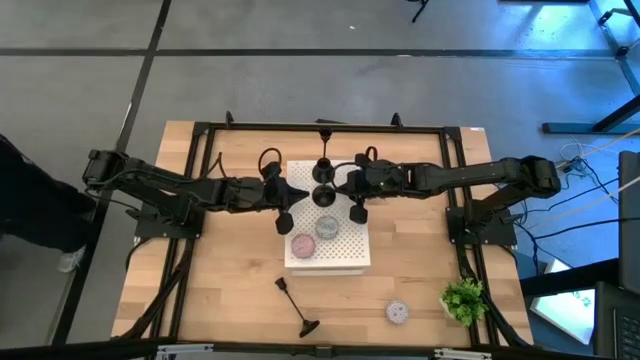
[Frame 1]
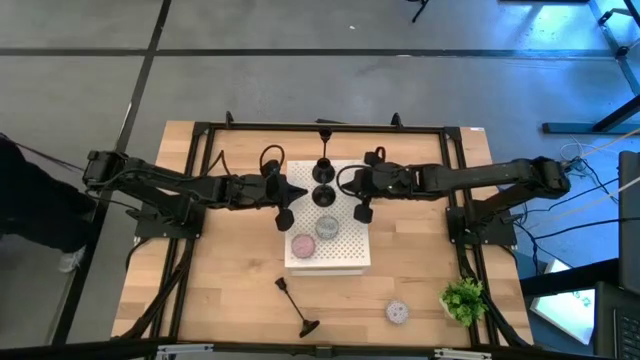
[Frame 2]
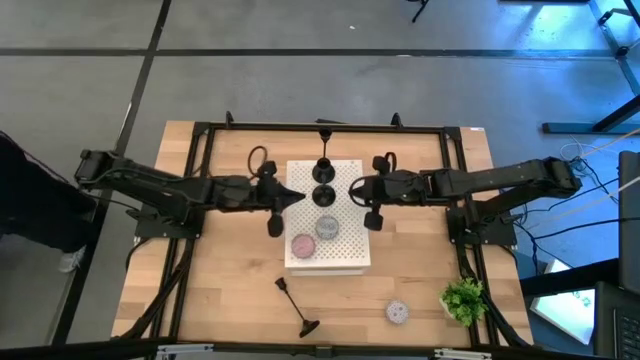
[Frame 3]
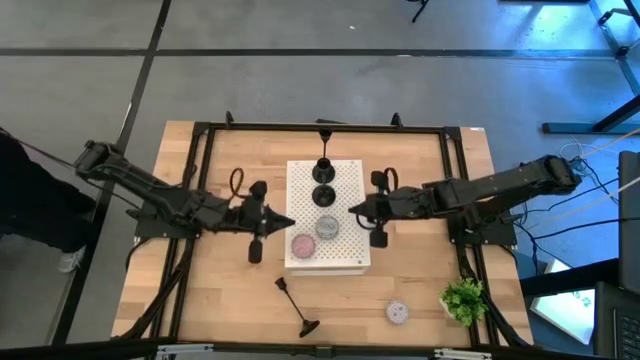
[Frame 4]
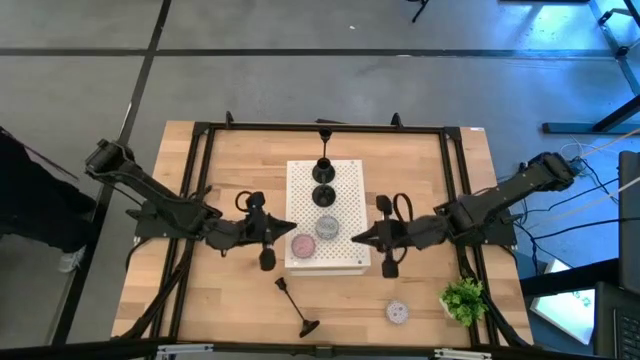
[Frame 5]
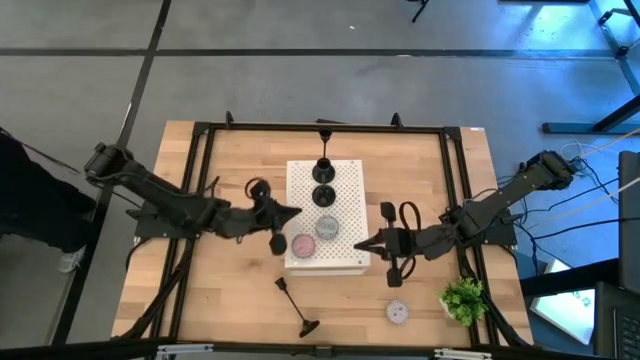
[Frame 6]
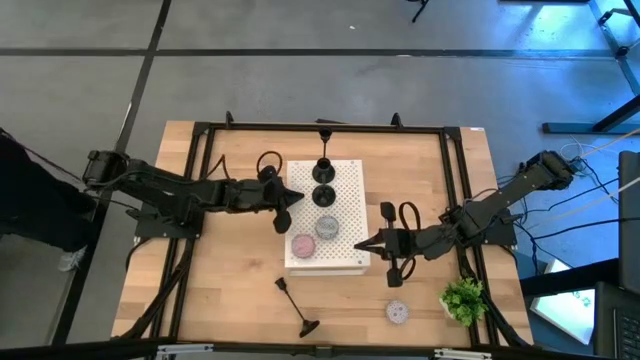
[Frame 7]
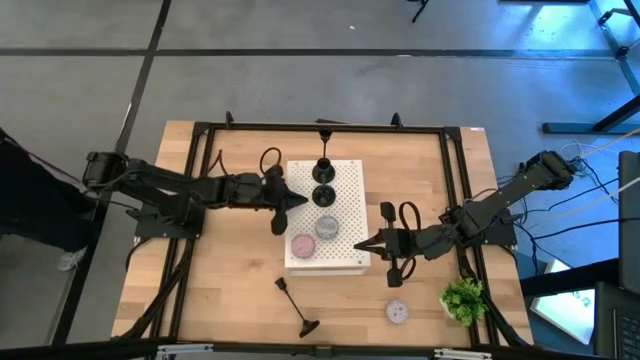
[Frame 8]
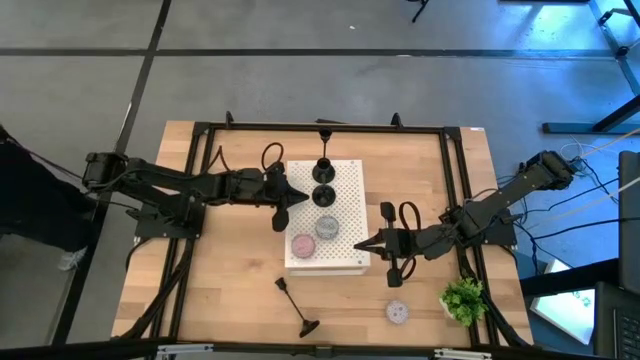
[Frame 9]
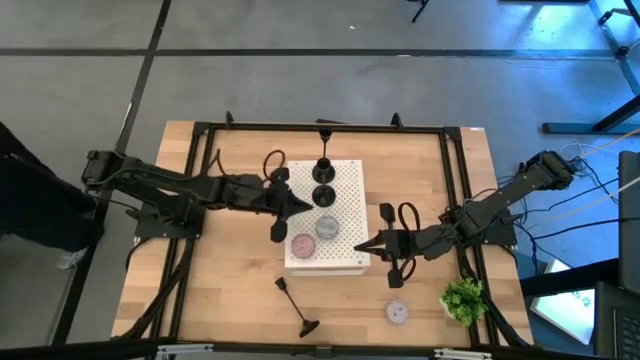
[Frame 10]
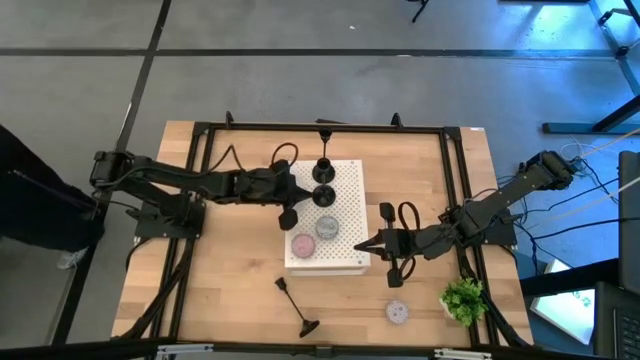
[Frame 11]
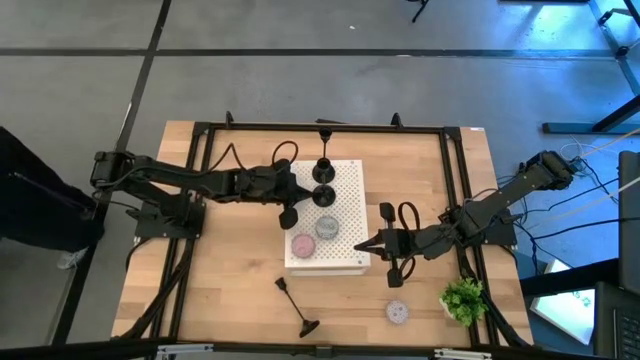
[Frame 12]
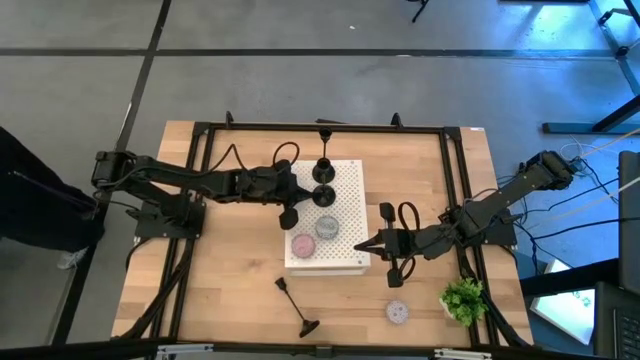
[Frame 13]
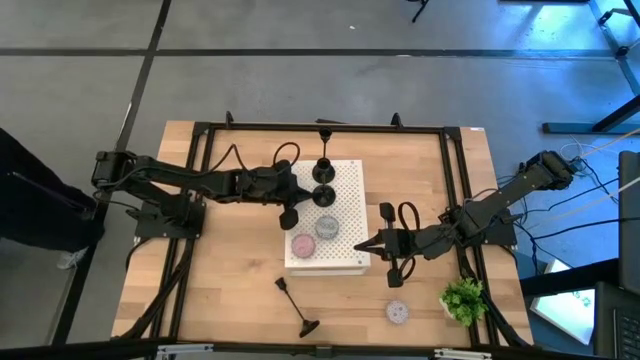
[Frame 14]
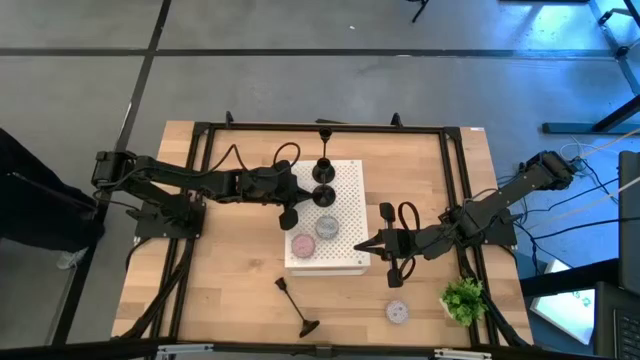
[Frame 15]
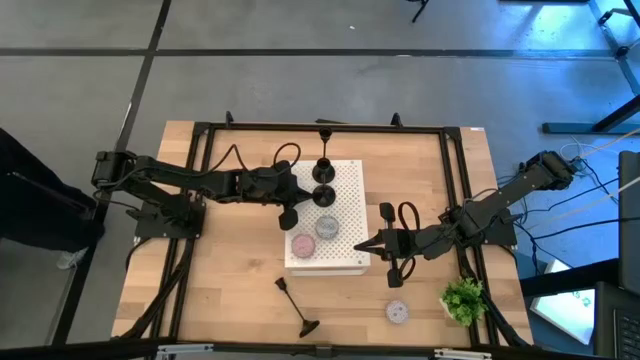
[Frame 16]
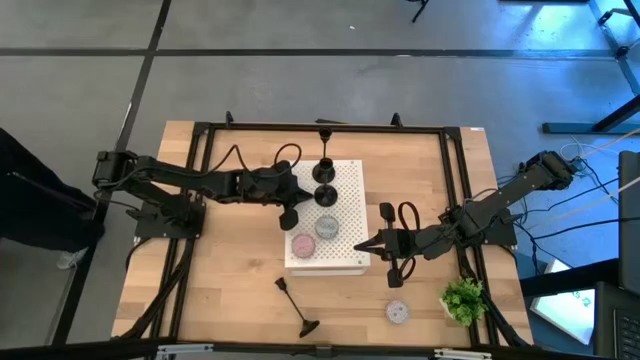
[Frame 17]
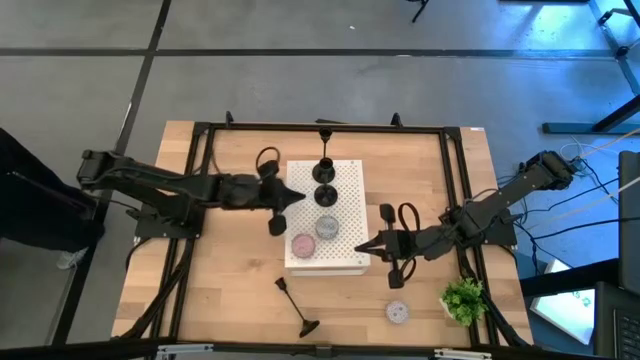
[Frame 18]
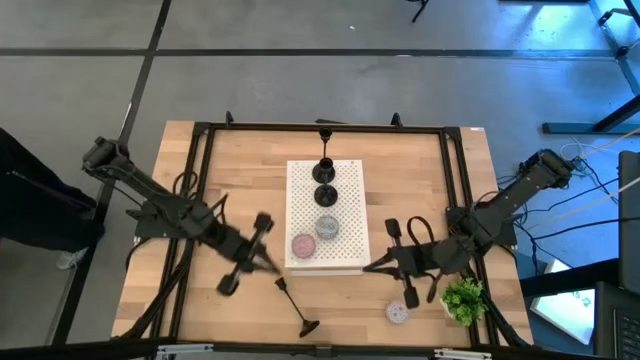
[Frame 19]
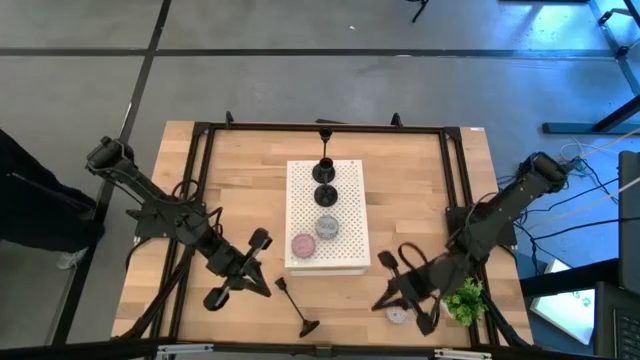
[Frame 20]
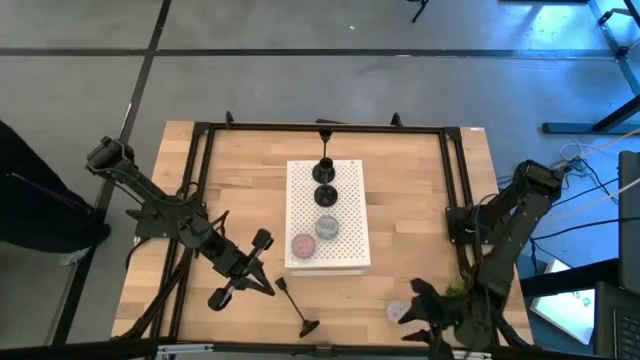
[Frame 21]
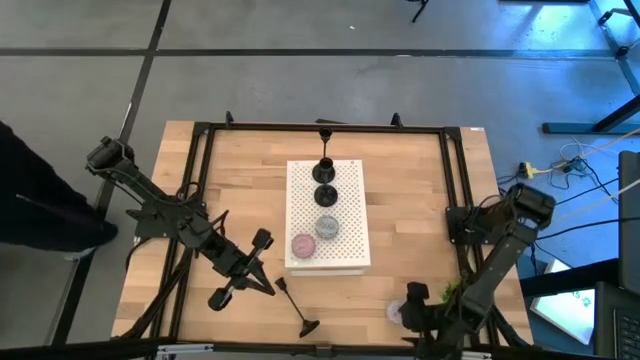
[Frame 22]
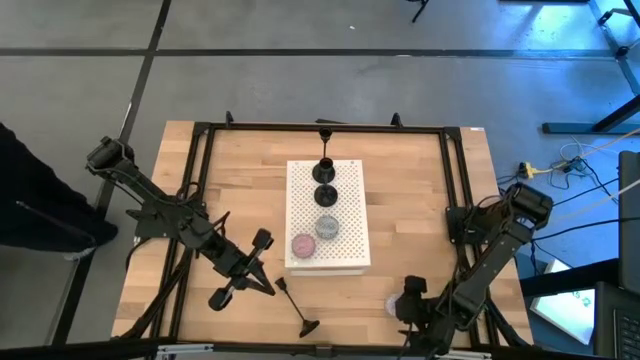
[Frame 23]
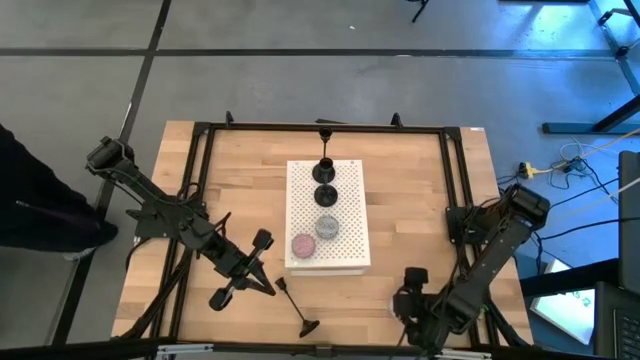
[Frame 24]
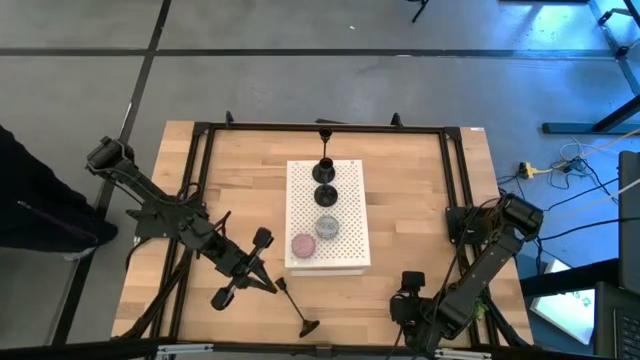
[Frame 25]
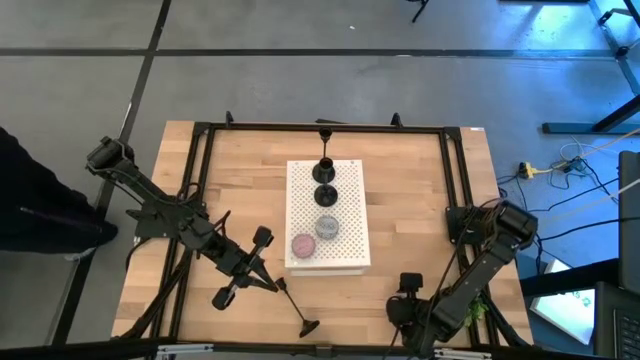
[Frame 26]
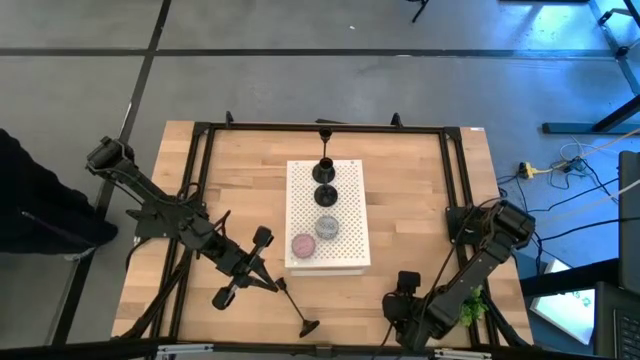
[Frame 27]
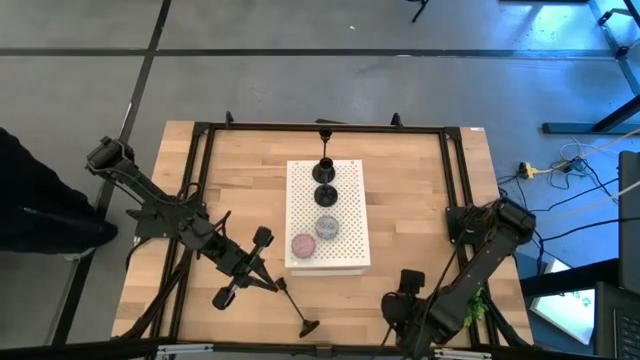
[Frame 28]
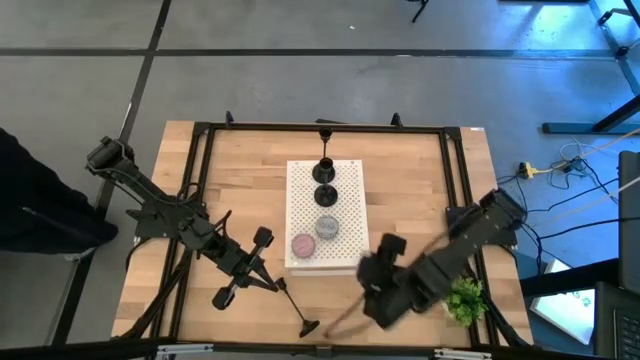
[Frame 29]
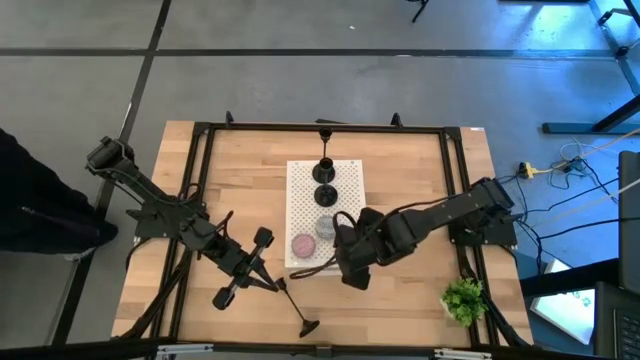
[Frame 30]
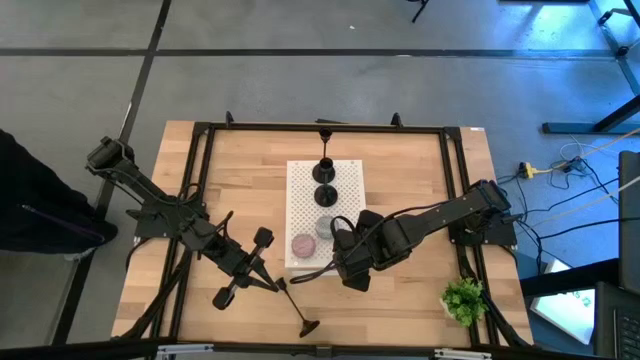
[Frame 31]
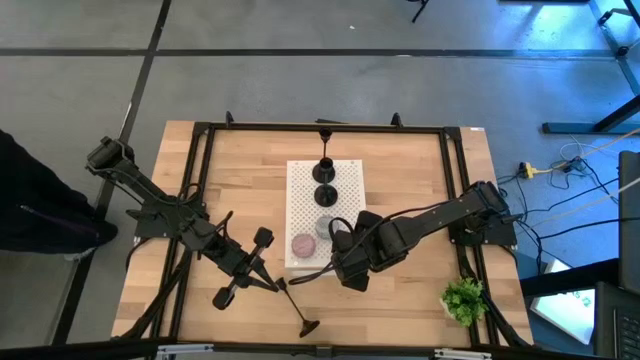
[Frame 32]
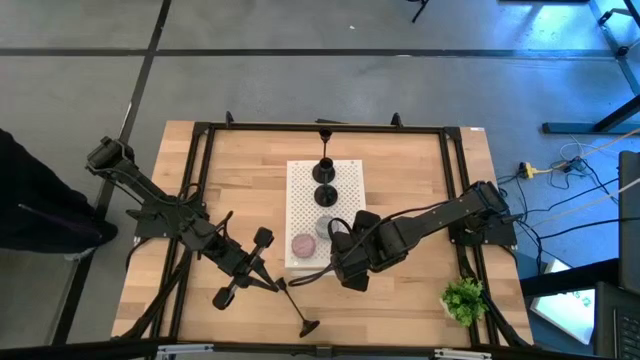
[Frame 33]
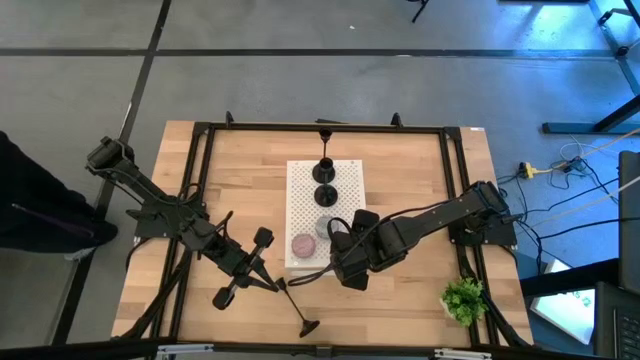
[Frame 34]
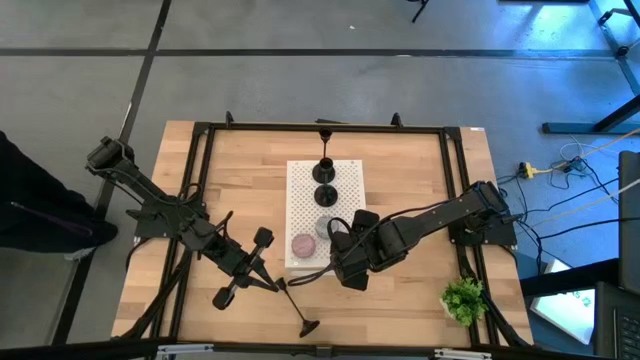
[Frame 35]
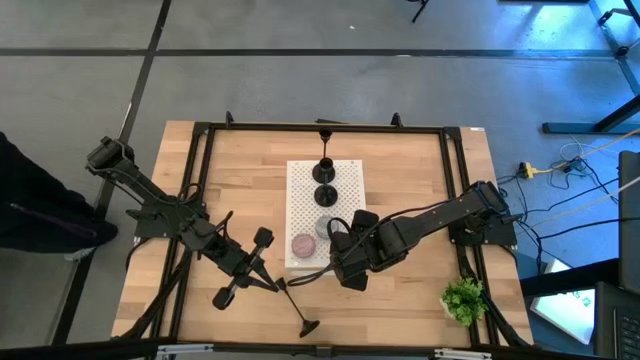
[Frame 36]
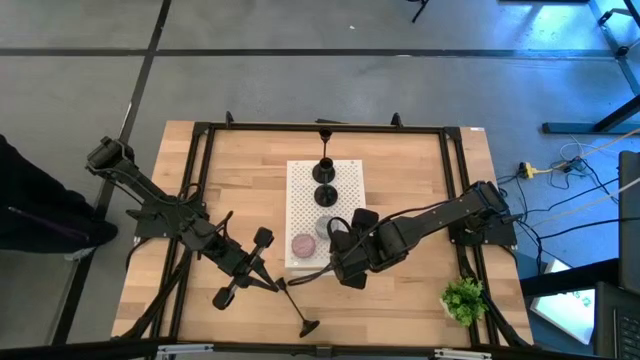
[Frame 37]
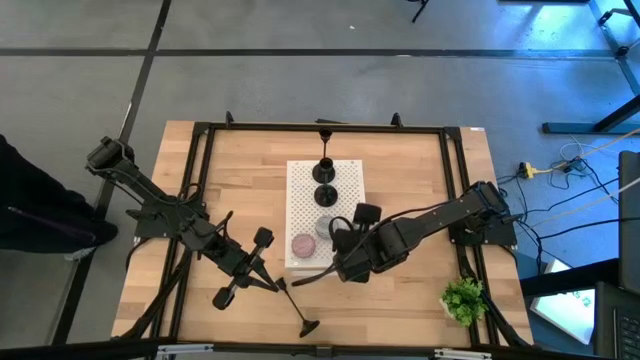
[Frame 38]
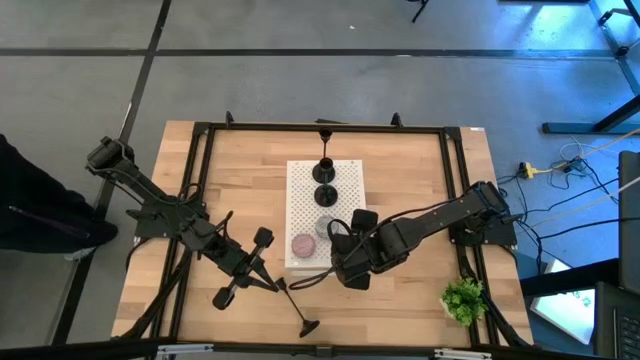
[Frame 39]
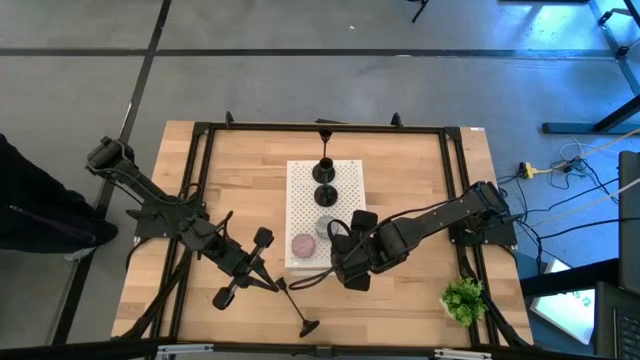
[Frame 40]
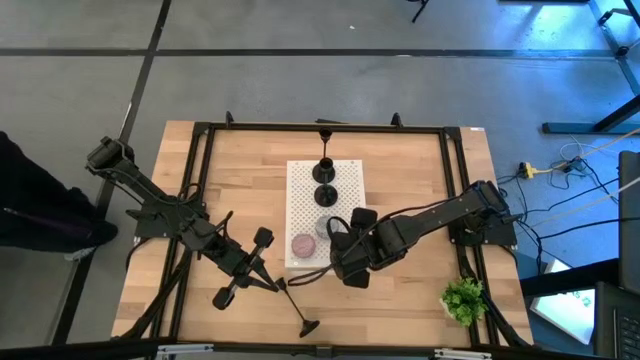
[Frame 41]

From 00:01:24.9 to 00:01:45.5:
Task: Pick & Place candle stick holders
Put the red patterned scented candle on the shelf
